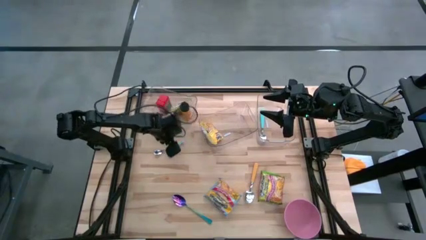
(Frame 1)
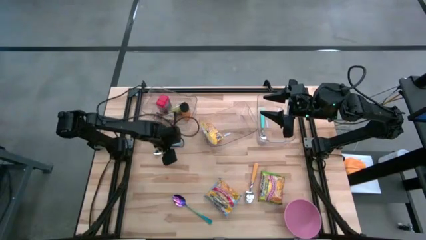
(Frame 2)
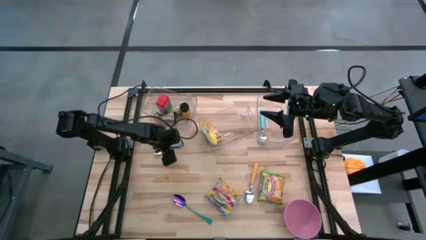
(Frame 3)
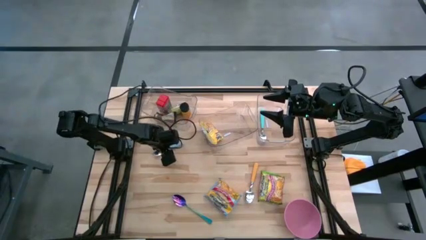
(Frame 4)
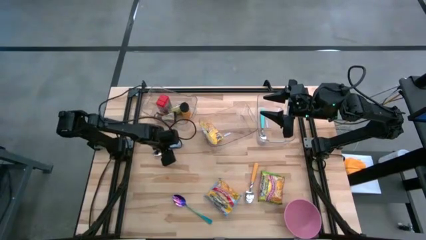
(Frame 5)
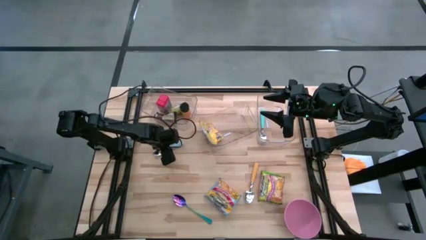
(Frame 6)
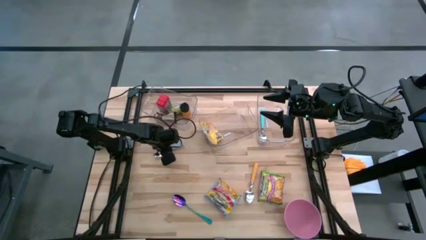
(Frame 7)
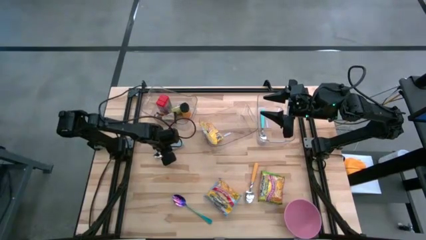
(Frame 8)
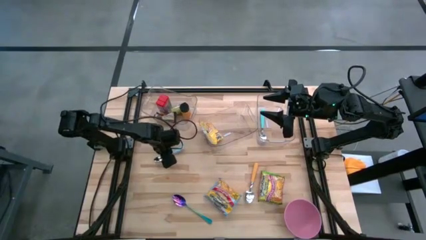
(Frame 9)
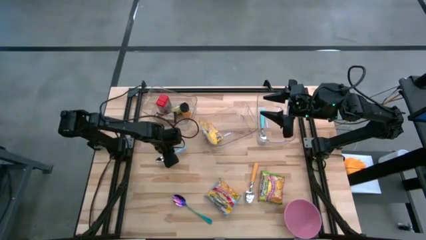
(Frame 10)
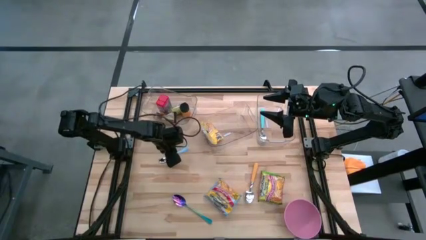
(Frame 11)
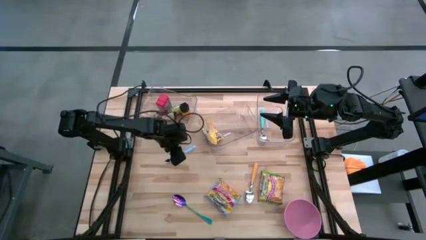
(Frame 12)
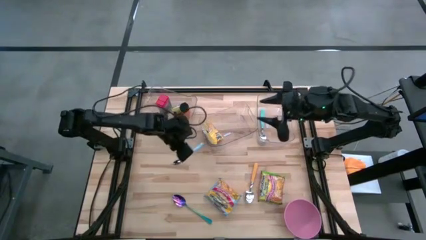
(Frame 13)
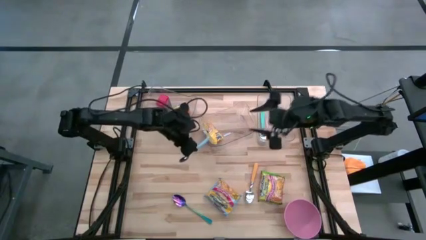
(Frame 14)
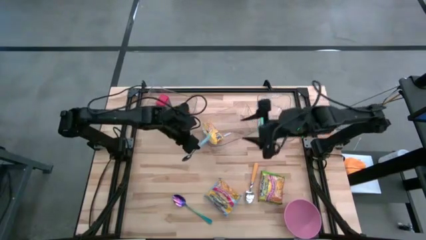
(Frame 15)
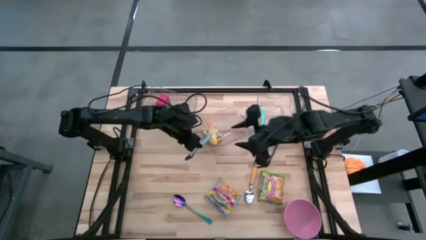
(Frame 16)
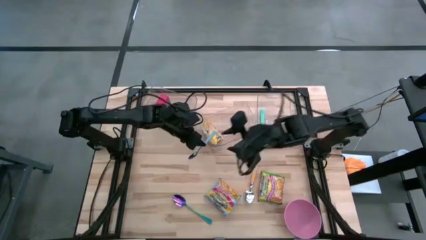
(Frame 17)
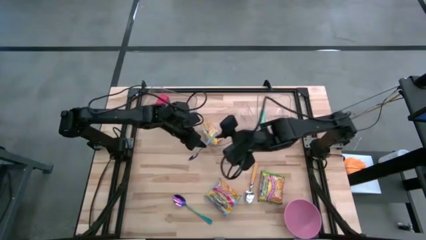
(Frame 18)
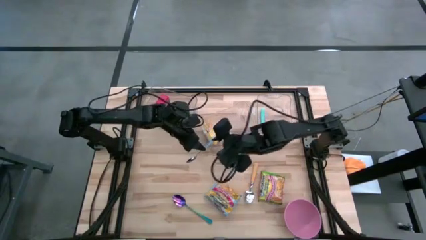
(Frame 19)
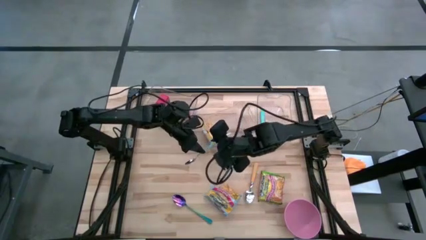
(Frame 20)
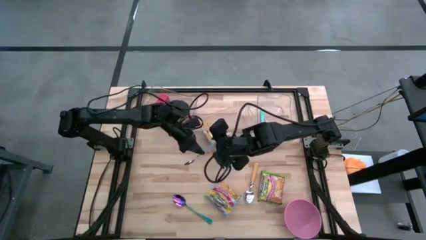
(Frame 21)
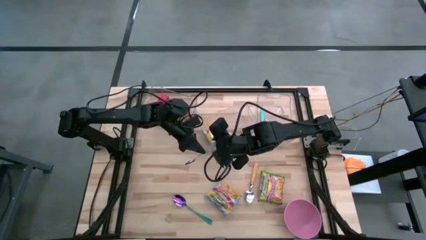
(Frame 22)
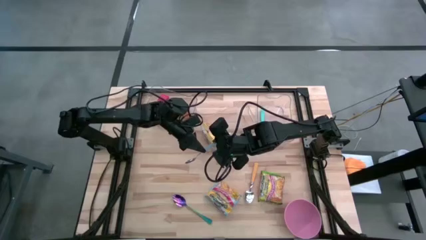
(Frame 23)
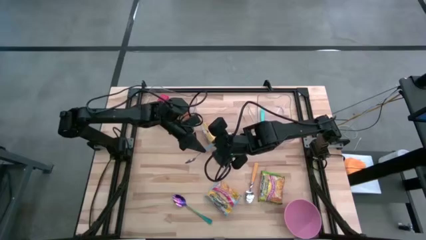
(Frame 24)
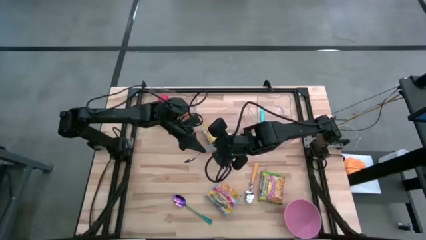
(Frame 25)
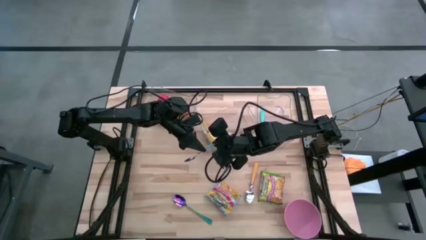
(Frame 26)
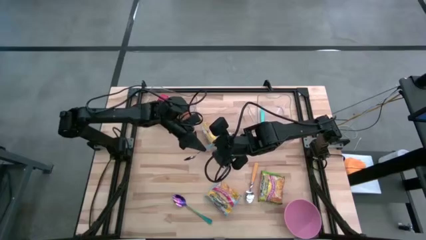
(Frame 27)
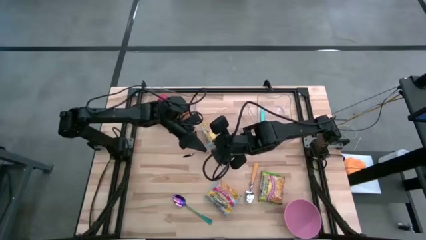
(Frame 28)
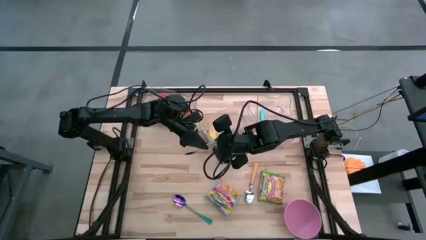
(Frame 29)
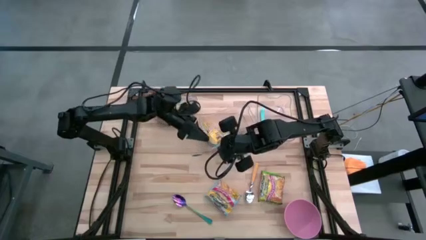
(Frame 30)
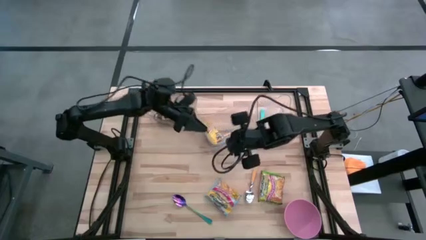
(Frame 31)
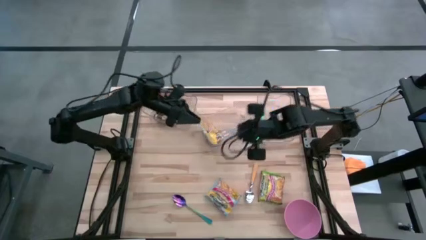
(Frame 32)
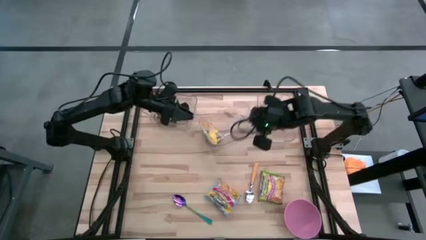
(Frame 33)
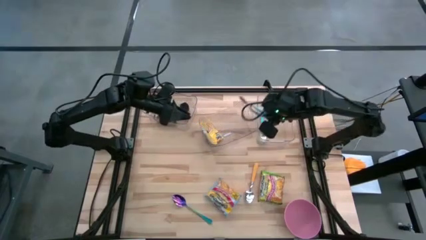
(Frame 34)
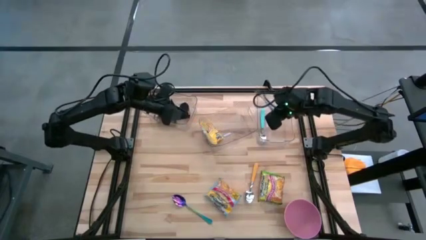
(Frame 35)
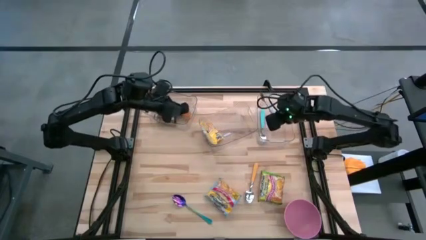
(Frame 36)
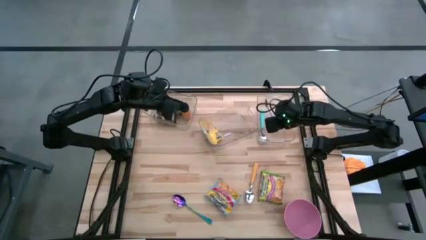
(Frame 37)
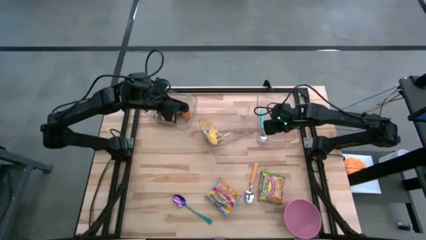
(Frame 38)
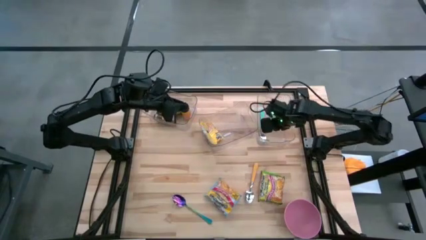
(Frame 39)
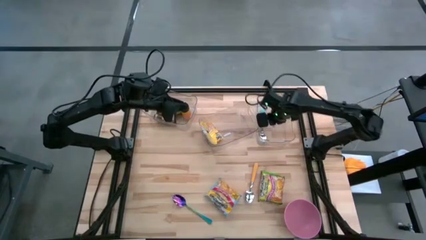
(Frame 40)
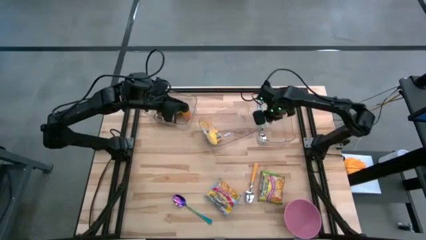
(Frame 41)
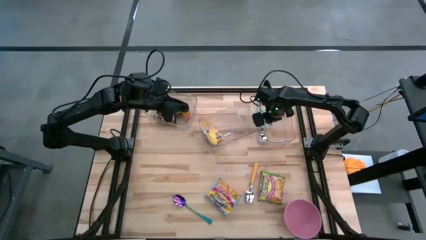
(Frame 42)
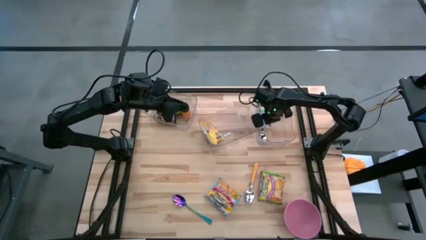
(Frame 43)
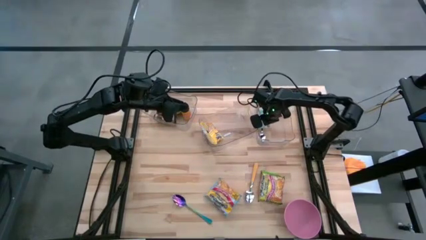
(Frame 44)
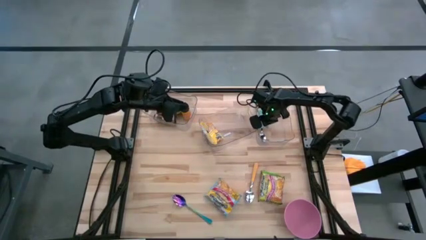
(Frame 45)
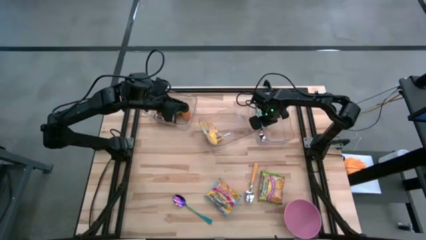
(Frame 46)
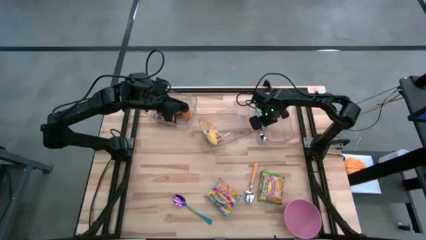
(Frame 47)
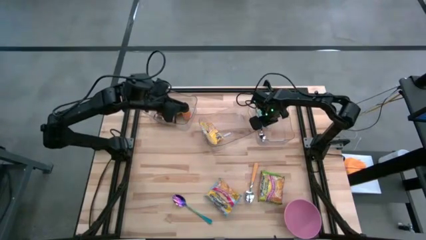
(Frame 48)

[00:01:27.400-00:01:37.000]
Task: Pick & Place Food Item
Put the light blue spoon into the right transparent bin

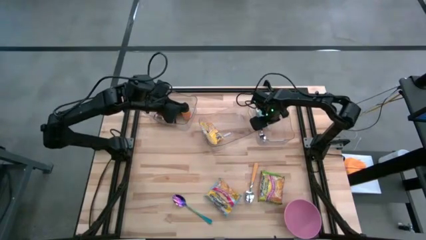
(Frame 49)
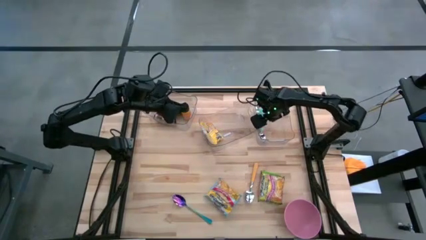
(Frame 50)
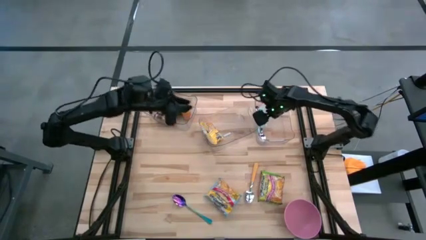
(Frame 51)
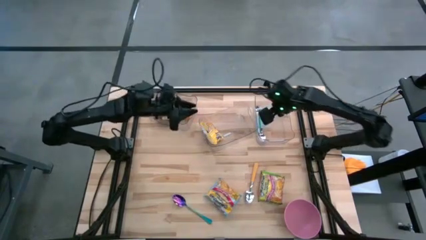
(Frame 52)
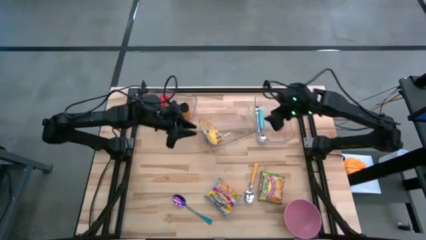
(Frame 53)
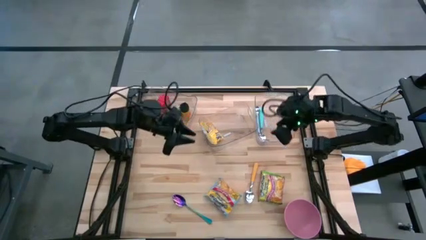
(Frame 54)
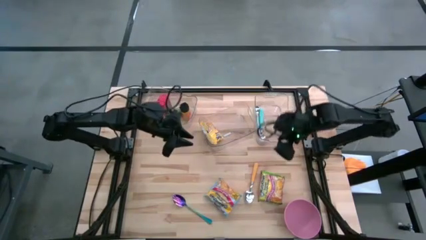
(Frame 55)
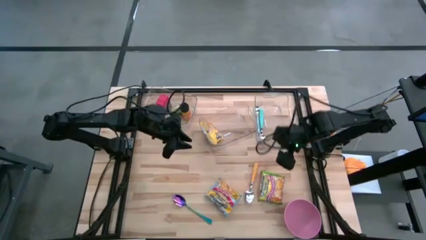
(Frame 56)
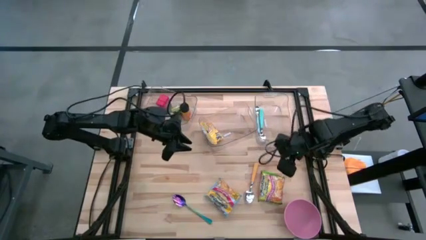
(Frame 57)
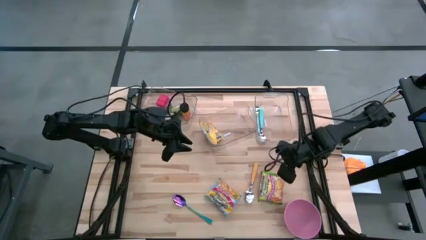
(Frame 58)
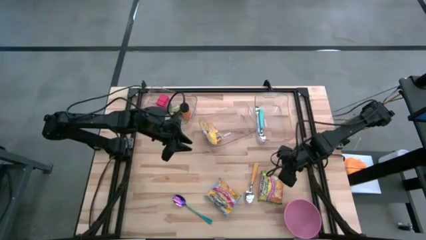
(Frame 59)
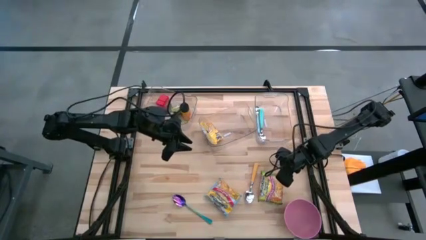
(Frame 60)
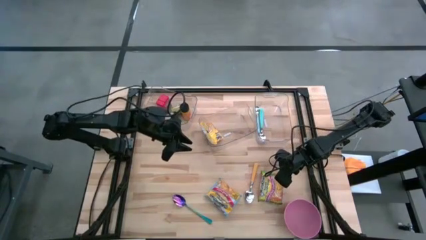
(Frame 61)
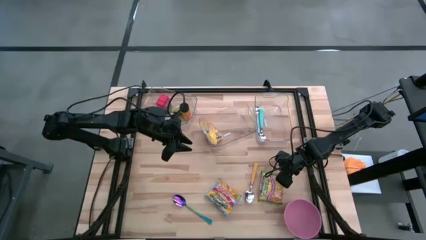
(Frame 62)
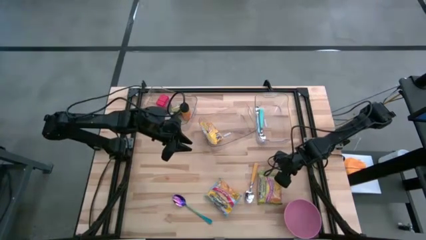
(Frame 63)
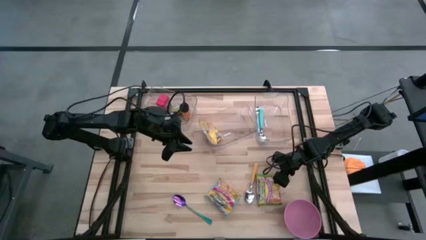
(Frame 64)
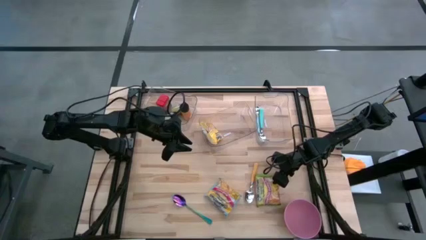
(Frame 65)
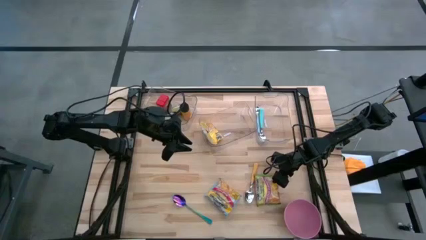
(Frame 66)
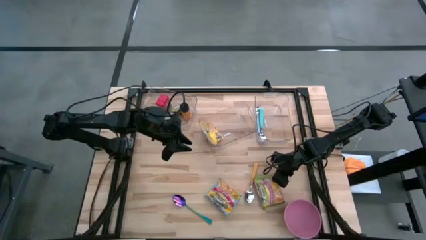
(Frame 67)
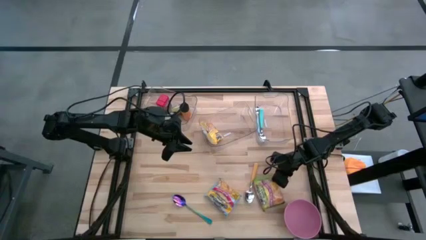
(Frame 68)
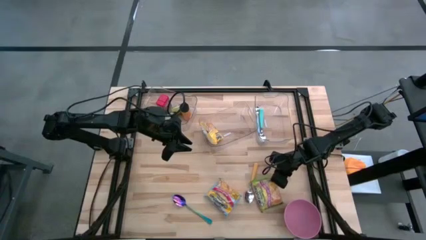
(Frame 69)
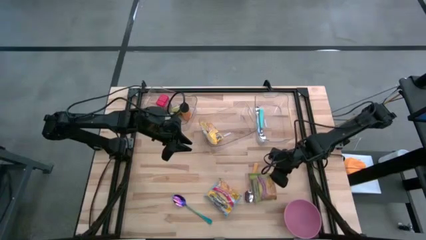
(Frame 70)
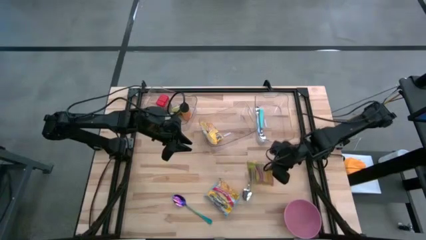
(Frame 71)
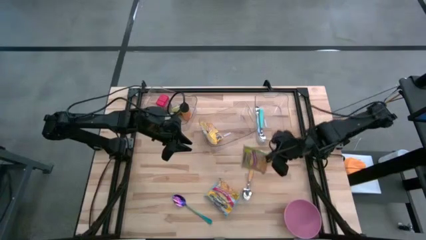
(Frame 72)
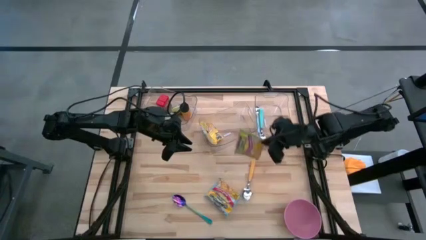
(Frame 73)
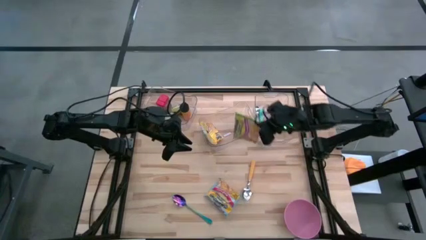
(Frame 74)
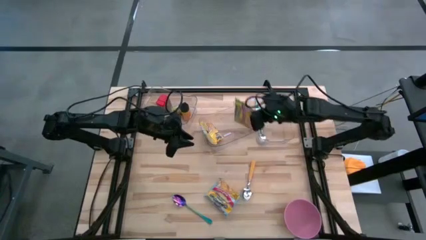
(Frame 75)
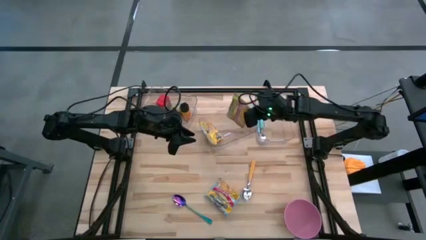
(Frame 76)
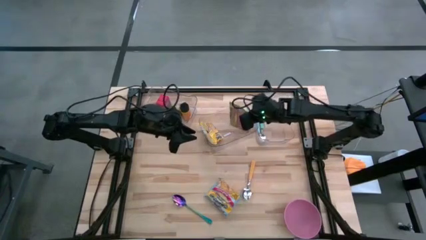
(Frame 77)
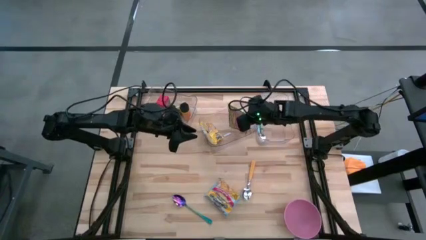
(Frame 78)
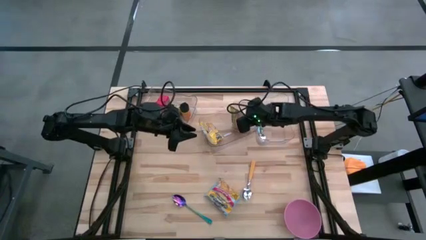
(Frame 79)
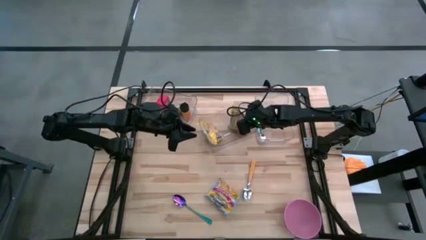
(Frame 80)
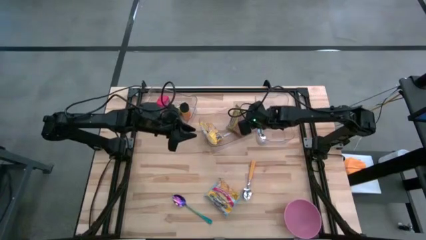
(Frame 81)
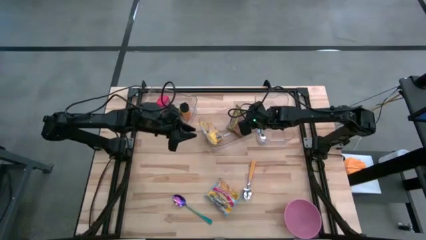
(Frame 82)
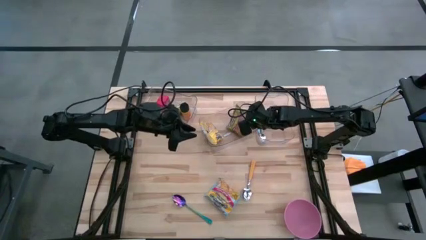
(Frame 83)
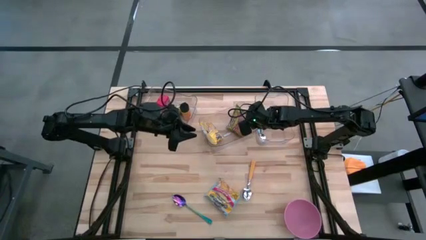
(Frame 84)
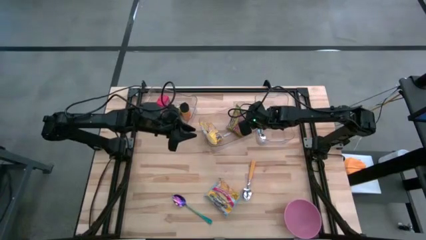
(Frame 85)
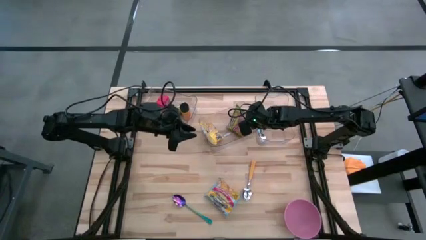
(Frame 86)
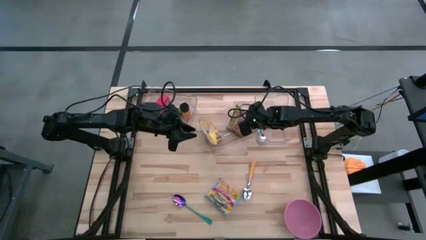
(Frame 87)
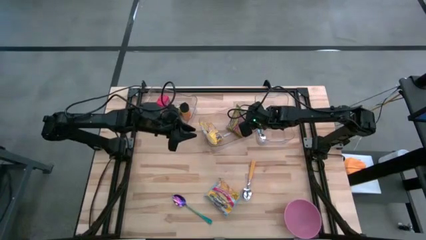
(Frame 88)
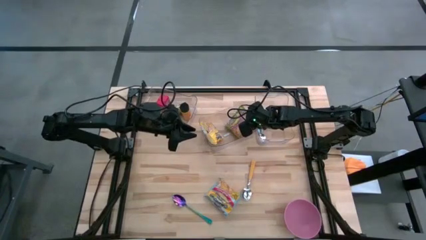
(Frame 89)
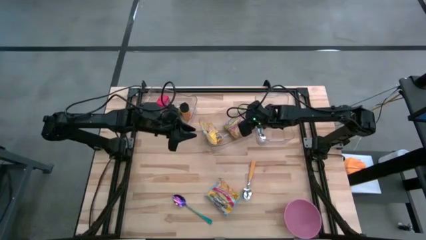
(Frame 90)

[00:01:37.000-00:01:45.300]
Put the green noodle pack into the middle transparent bin
